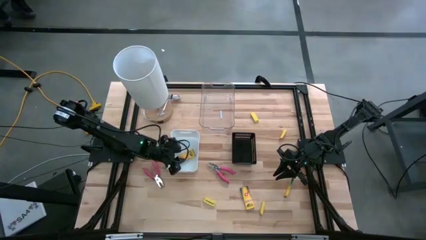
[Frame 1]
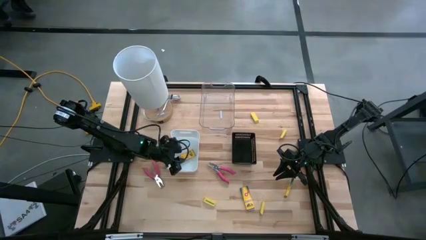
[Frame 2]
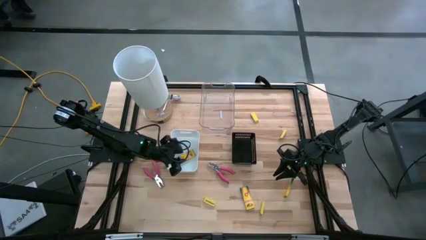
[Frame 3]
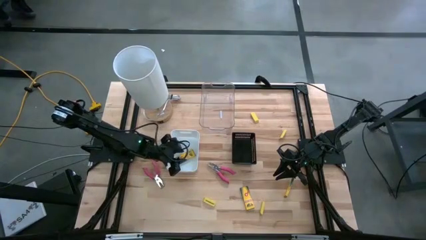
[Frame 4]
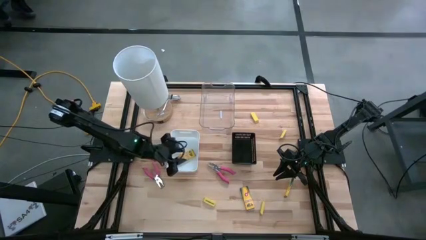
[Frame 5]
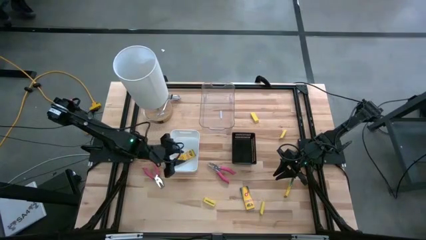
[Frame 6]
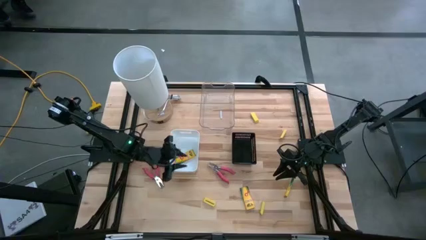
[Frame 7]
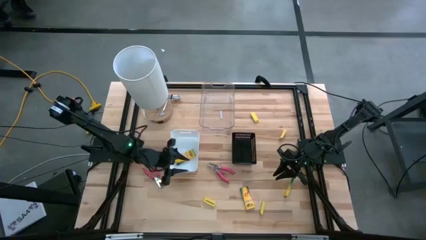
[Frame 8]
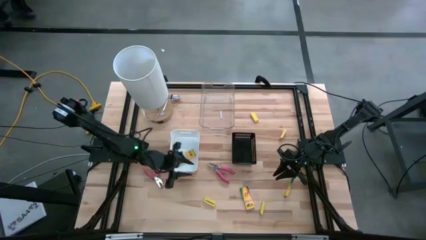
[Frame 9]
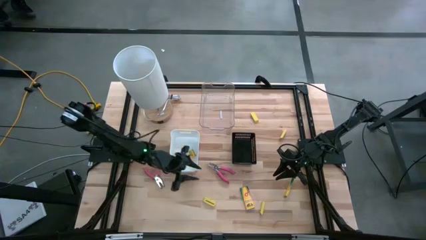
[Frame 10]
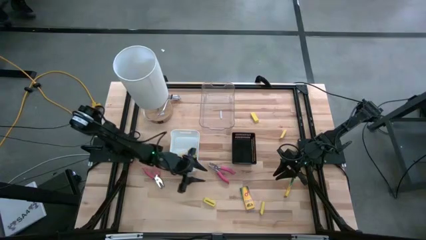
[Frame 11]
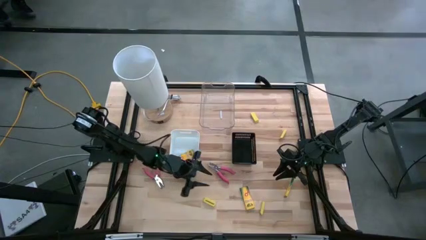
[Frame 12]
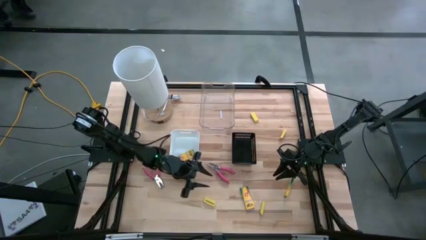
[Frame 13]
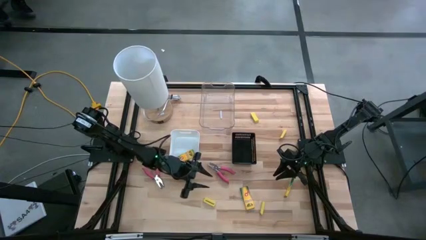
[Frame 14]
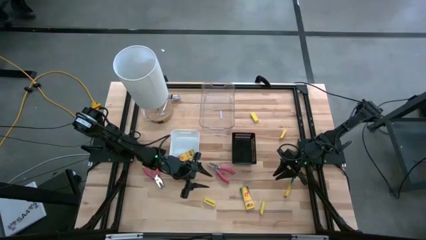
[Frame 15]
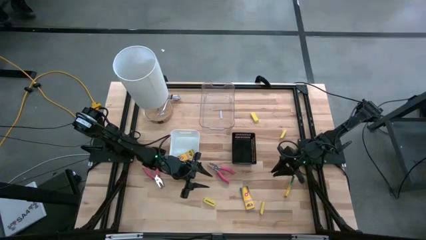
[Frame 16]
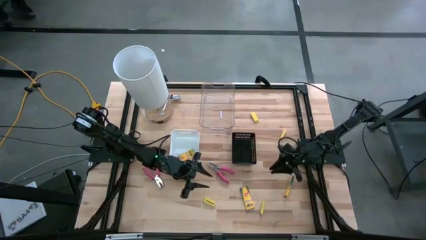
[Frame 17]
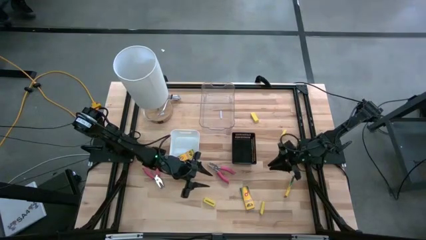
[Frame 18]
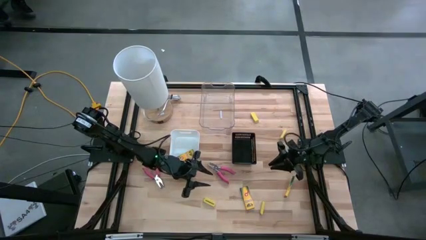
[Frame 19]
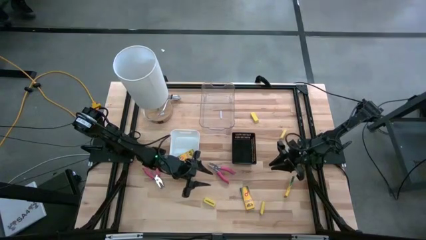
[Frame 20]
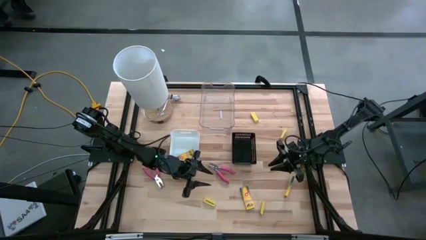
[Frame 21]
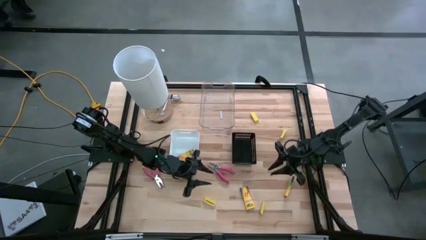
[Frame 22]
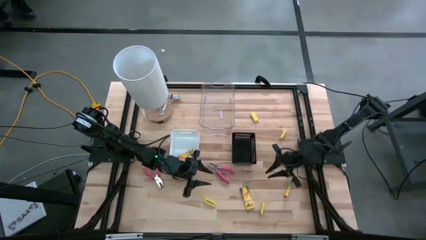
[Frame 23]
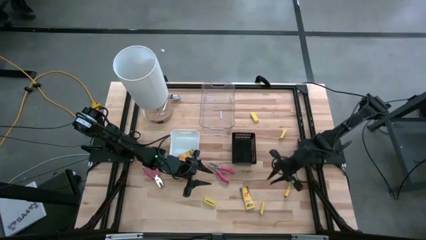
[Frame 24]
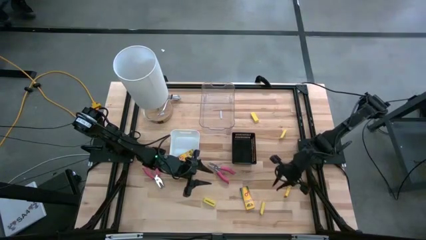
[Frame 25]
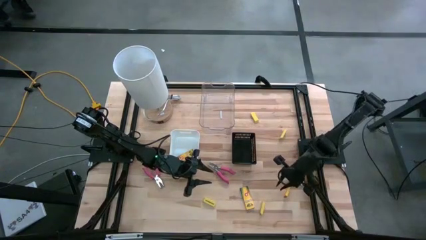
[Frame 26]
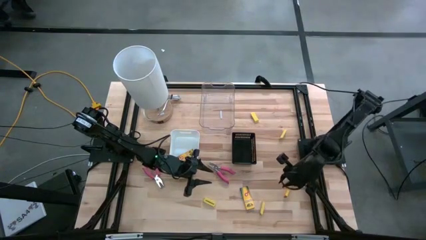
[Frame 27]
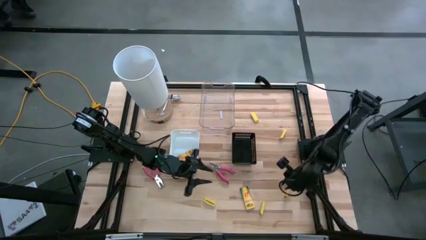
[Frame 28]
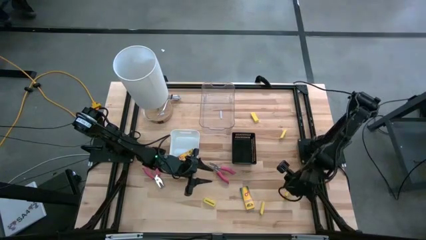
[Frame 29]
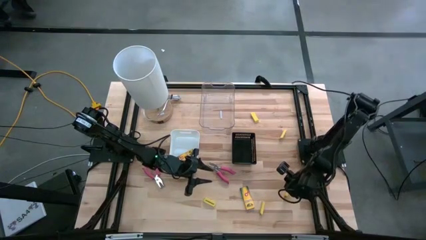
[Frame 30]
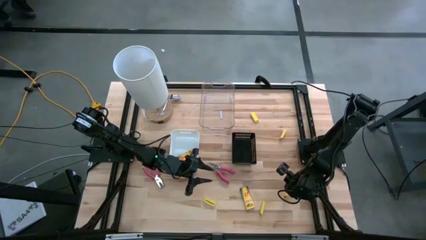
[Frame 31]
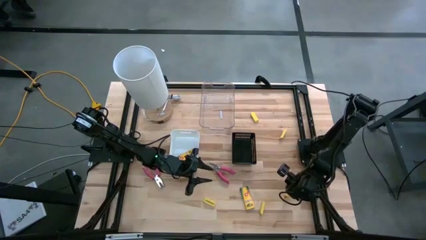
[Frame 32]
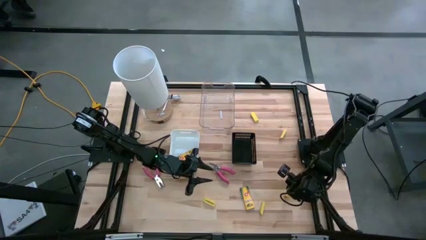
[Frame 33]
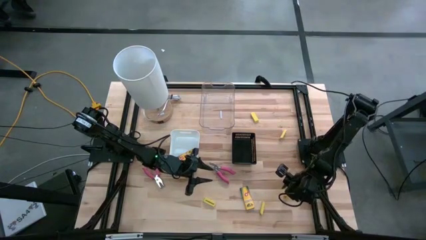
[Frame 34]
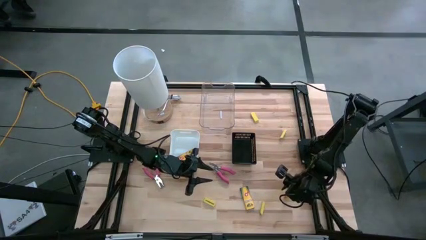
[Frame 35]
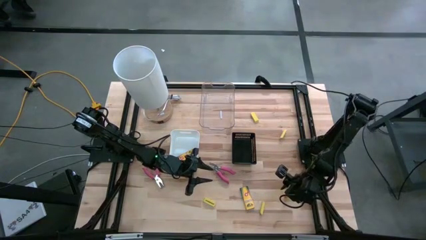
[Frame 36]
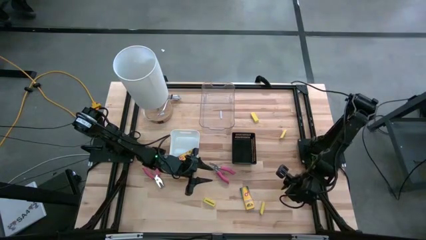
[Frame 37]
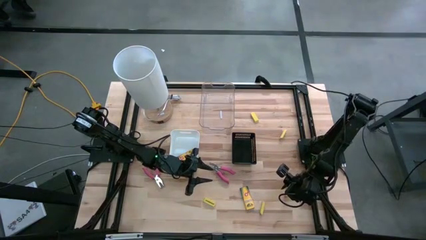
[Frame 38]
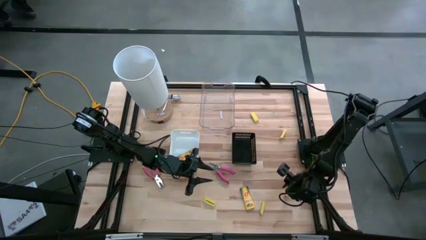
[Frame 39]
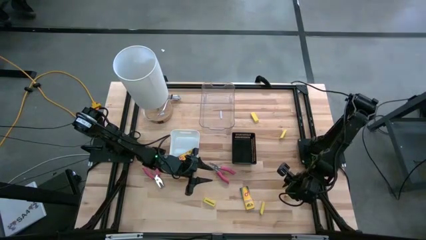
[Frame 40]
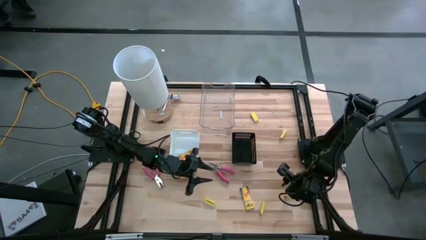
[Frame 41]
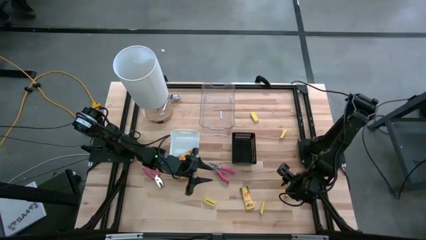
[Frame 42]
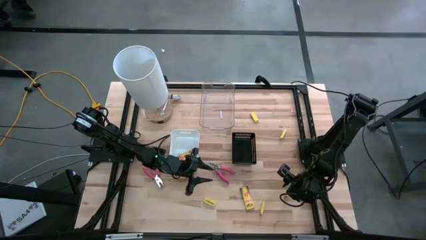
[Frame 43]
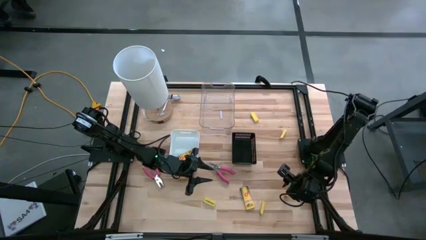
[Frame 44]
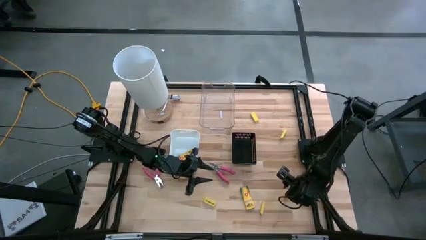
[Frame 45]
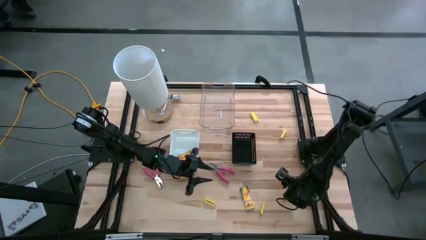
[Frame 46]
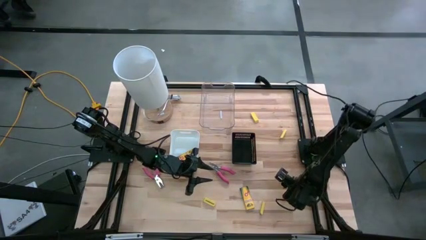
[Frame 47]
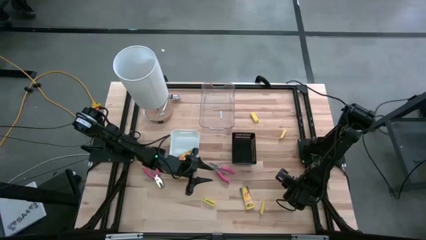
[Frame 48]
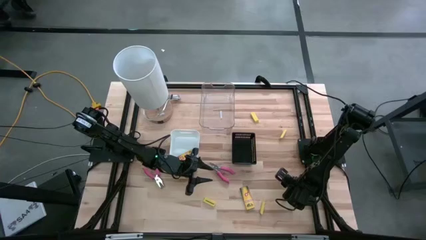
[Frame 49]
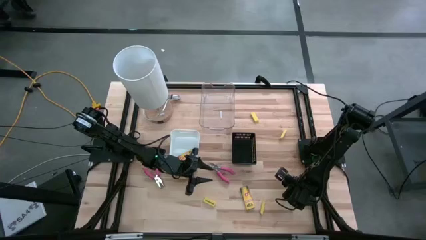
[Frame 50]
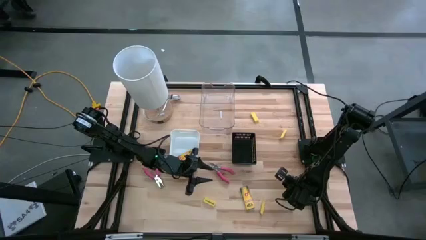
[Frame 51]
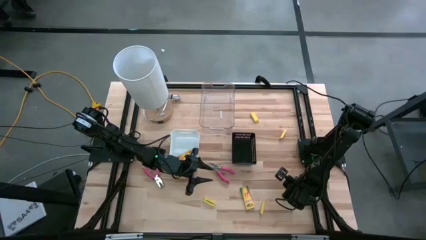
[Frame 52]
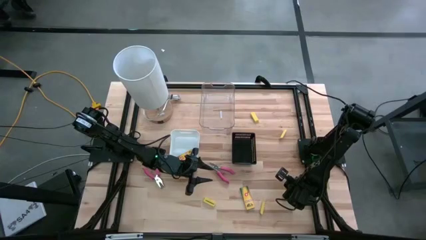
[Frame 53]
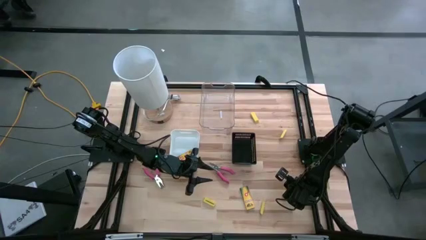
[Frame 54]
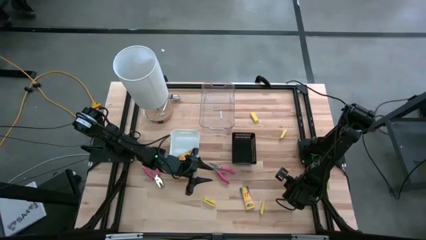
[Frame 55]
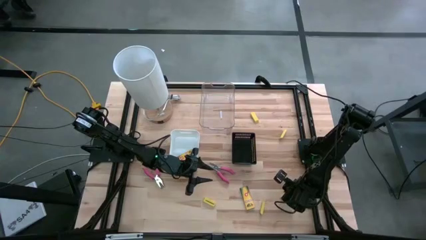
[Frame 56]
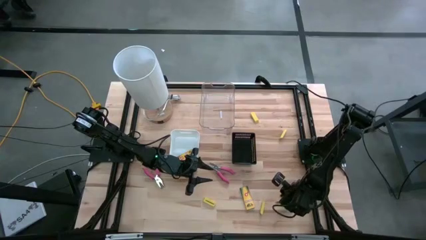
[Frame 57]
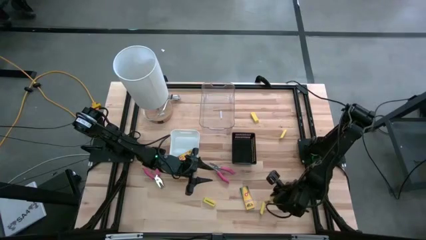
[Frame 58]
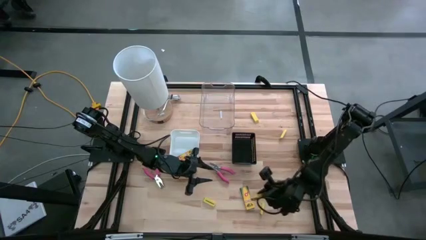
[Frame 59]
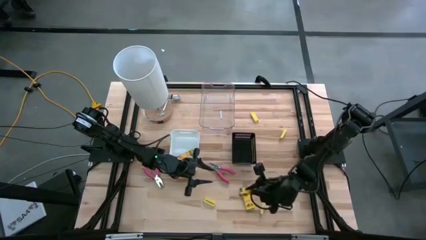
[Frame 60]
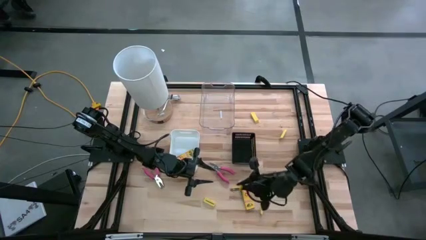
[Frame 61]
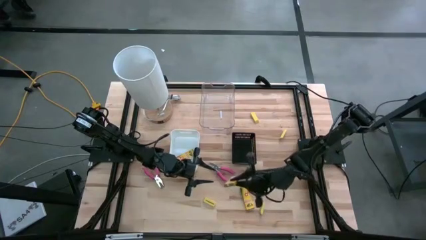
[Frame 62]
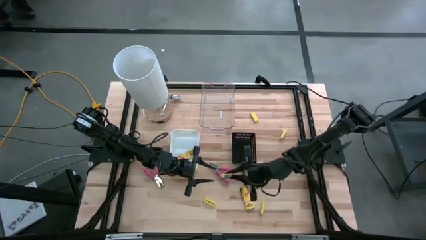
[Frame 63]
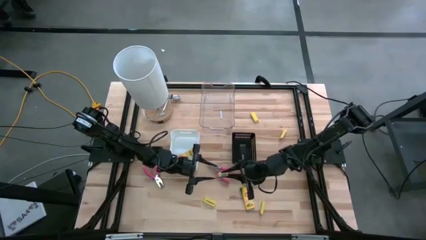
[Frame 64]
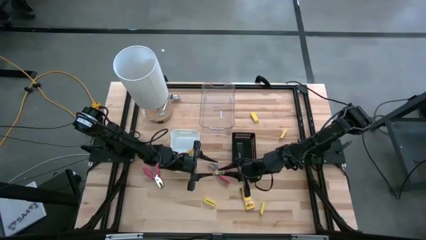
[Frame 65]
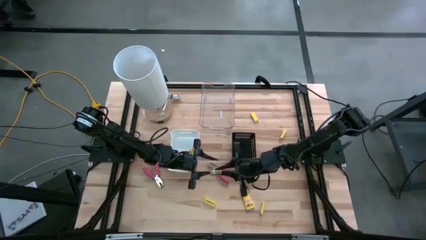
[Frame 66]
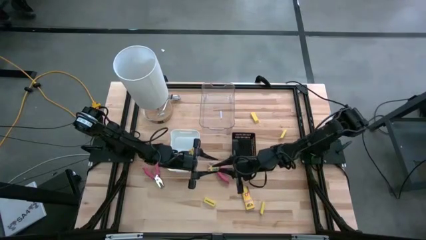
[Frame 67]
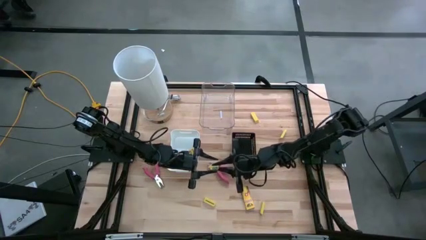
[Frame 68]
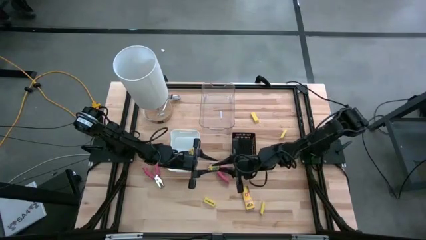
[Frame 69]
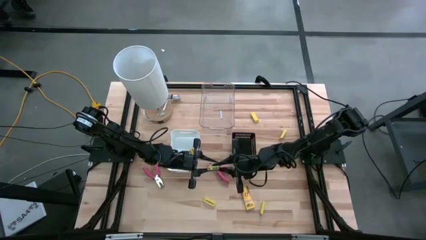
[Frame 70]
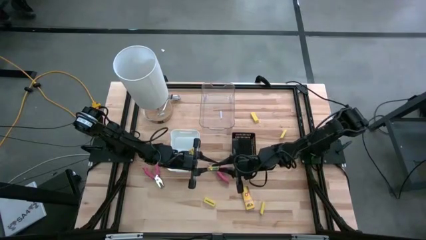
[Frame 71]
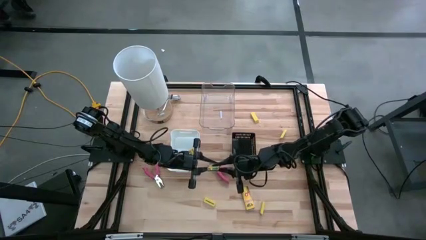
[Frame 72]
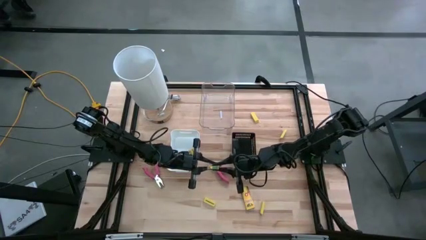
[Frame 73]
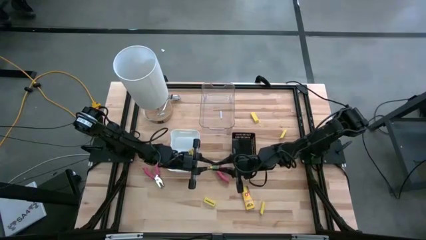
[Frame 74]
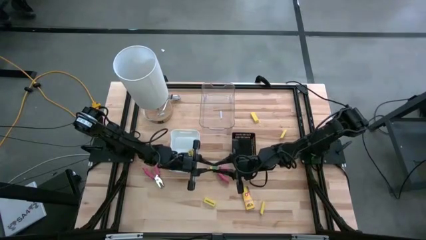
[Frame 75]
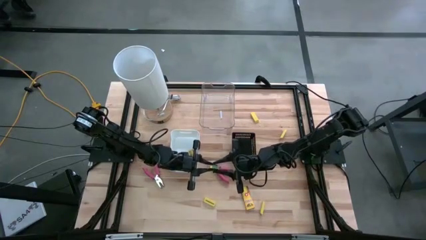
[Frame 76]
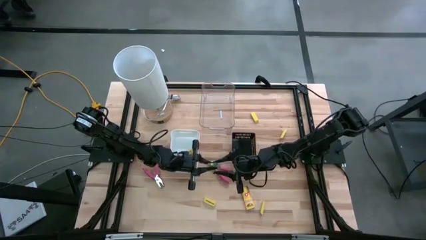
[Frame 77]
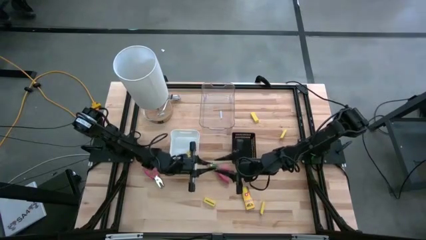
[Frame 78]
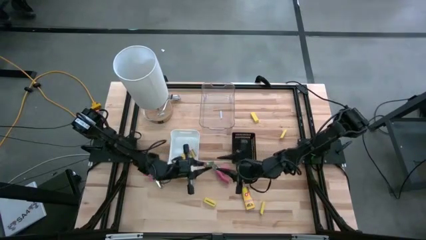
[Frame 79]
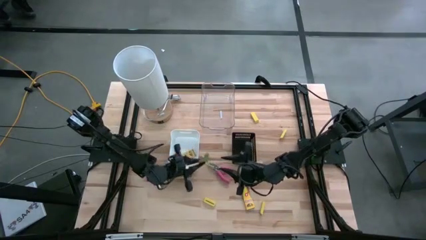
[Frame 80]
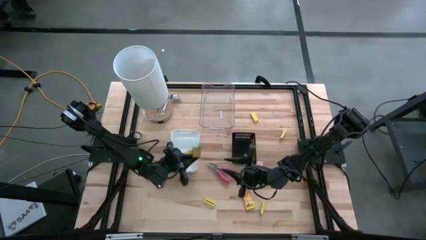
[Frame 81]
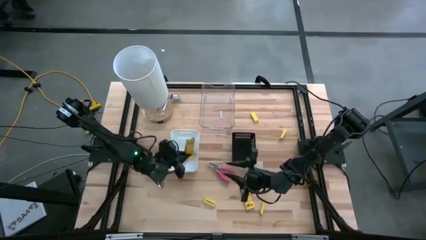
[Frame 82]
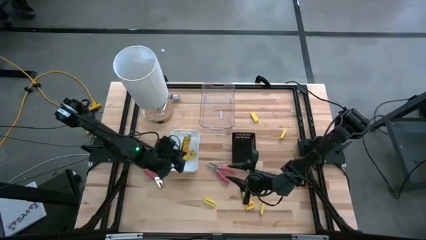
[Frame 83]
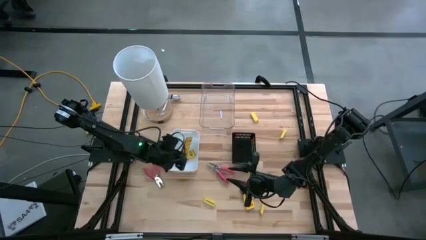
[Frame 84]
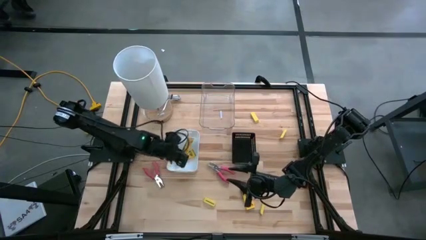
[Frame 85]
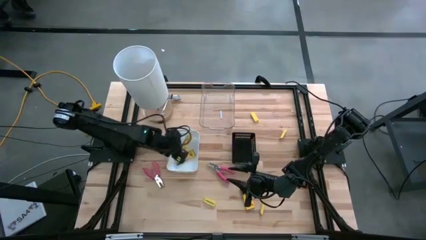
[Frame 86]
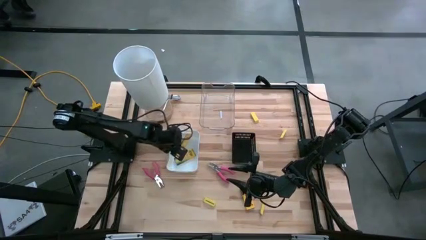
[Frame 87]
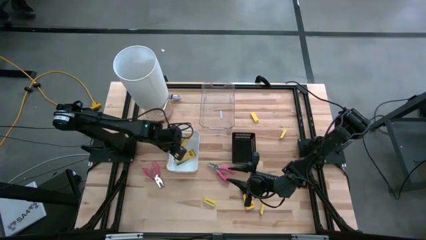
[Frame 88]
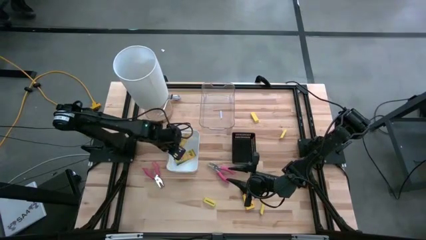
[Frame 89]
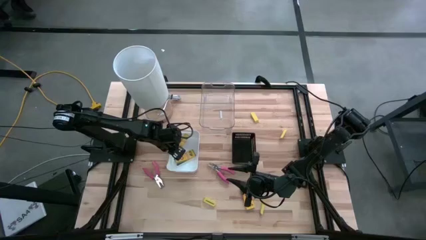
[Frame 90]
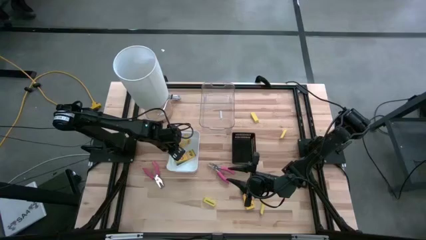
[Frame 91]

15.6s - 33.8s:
Task: Pick & Place School Supplies
Put the right box of crayon into the white bin
